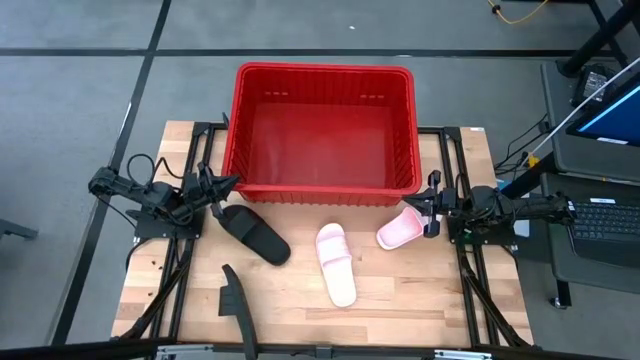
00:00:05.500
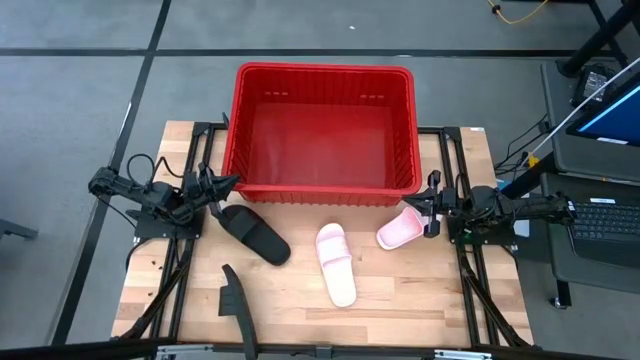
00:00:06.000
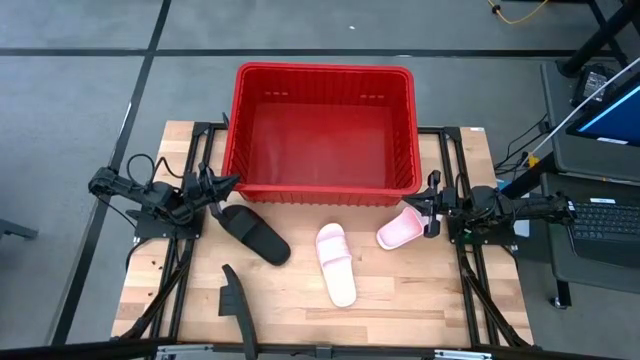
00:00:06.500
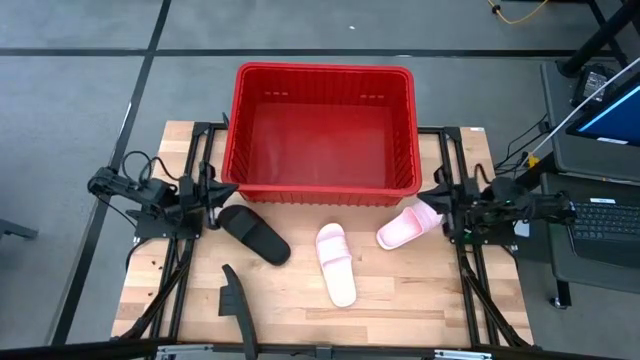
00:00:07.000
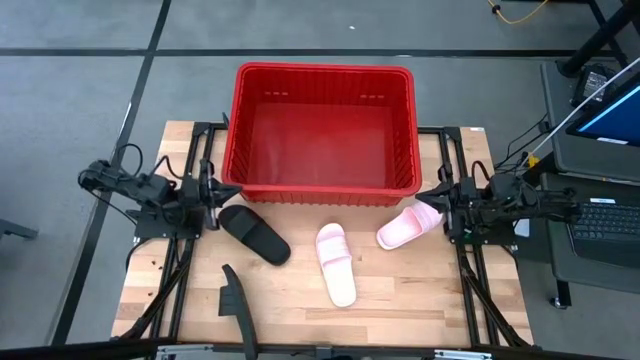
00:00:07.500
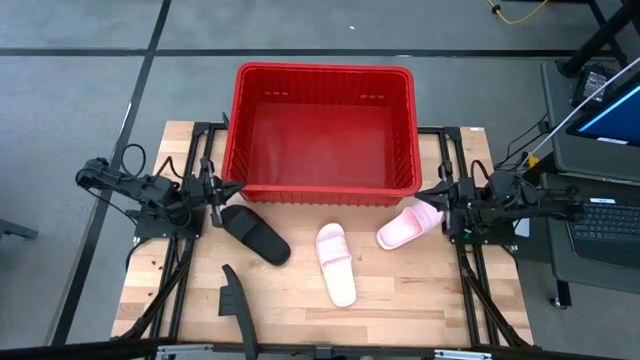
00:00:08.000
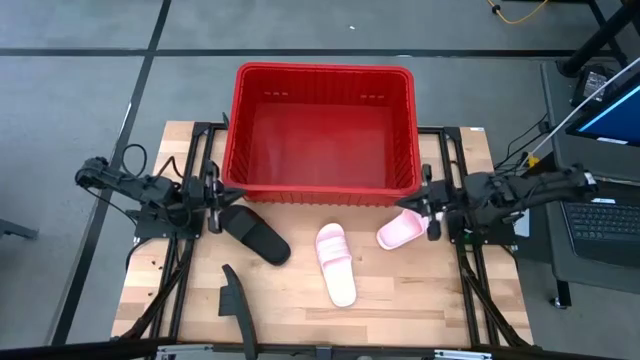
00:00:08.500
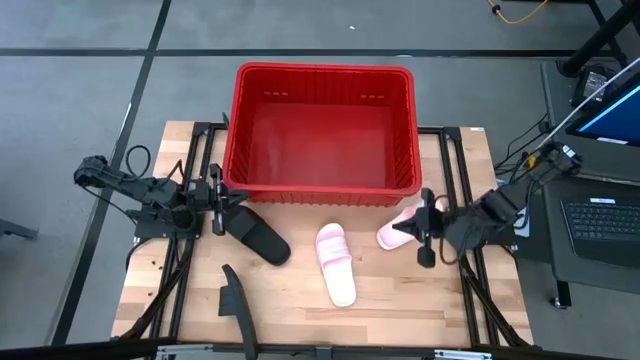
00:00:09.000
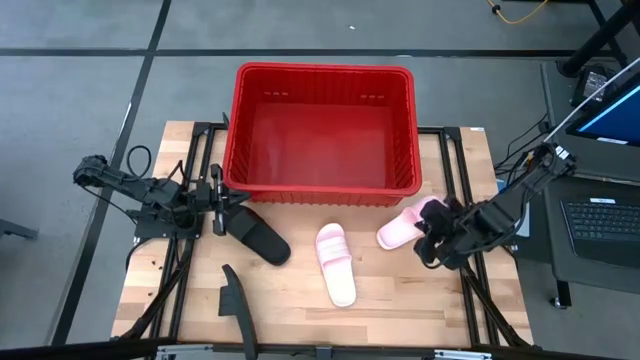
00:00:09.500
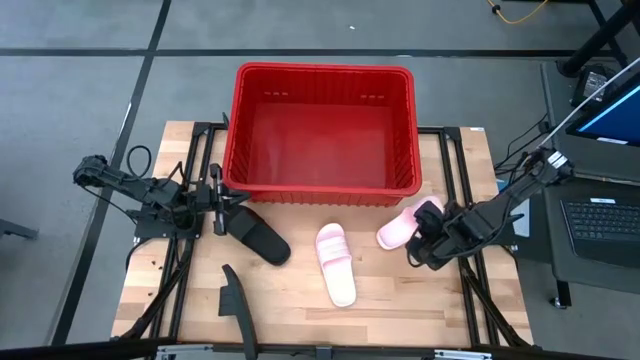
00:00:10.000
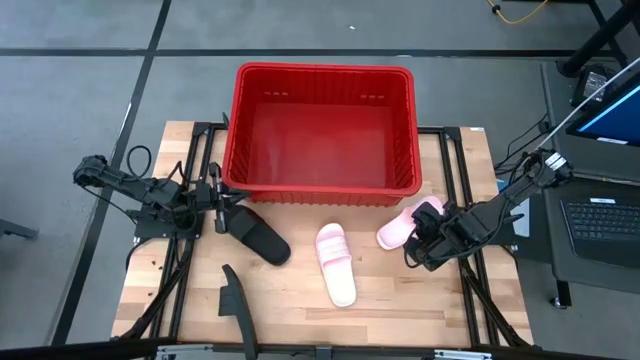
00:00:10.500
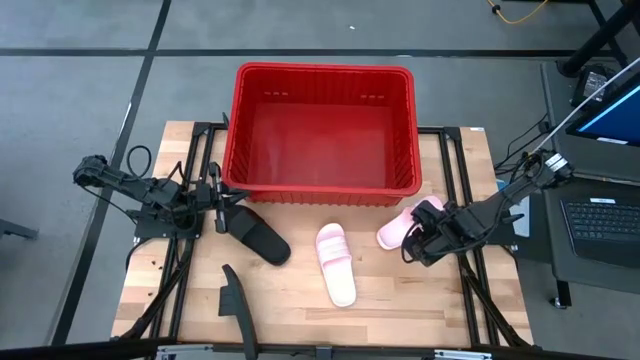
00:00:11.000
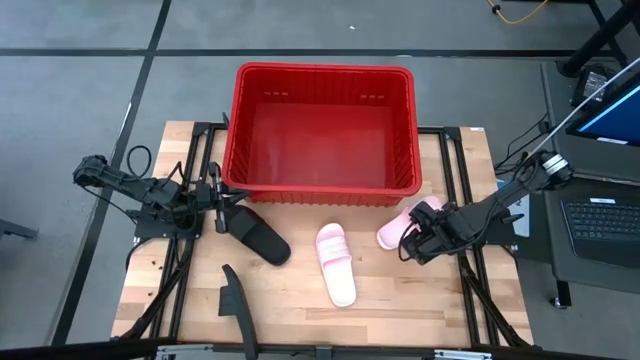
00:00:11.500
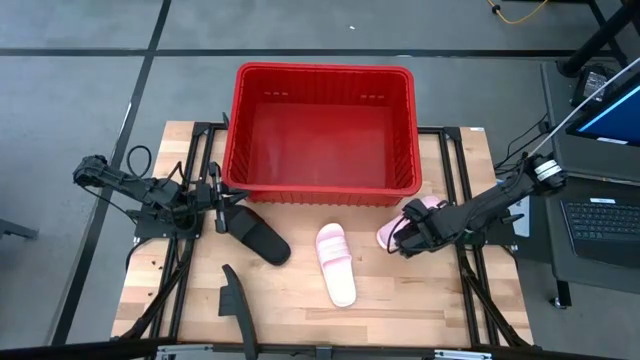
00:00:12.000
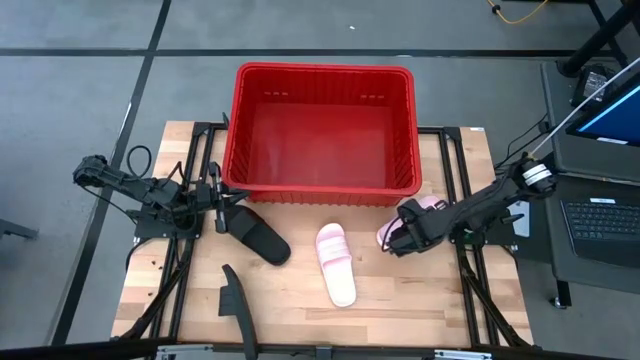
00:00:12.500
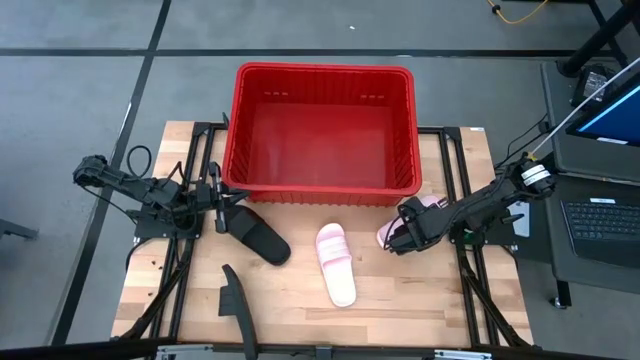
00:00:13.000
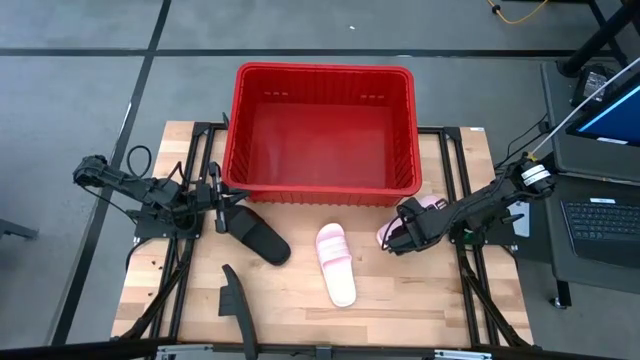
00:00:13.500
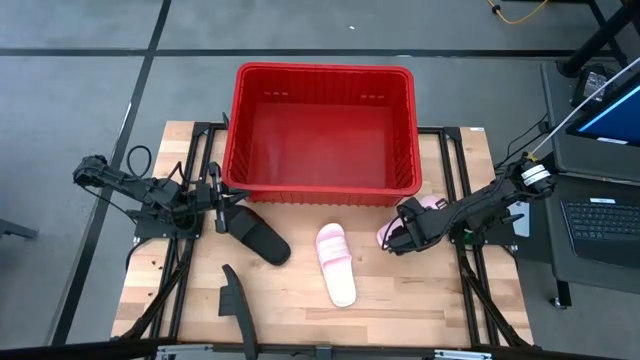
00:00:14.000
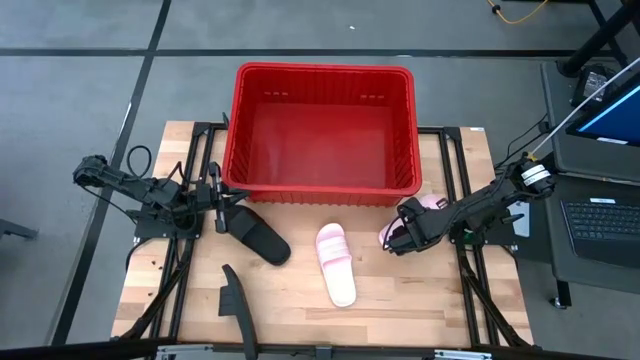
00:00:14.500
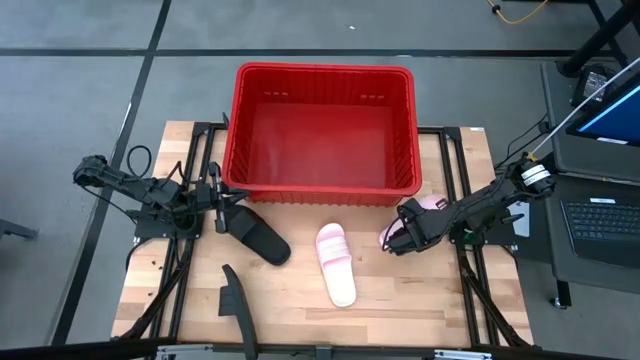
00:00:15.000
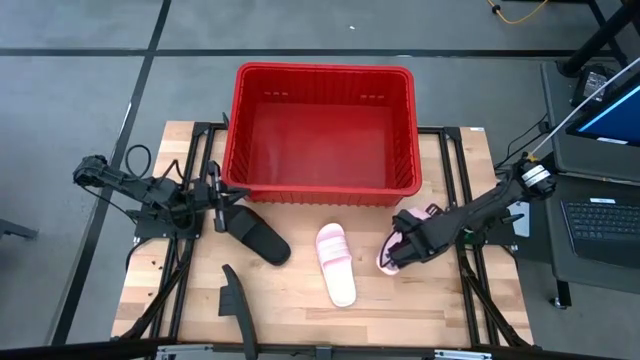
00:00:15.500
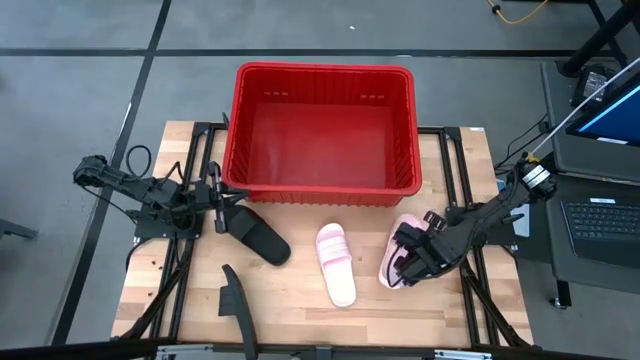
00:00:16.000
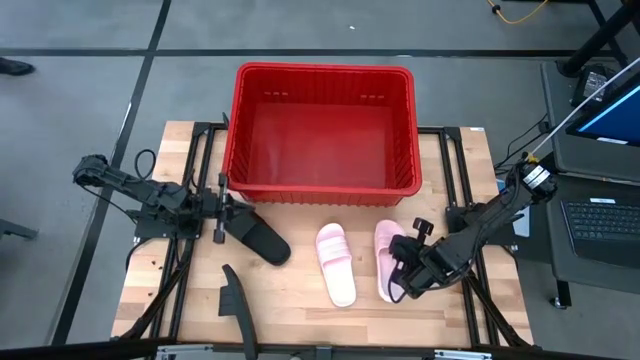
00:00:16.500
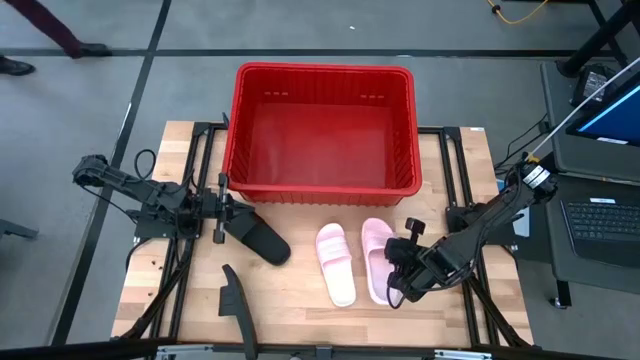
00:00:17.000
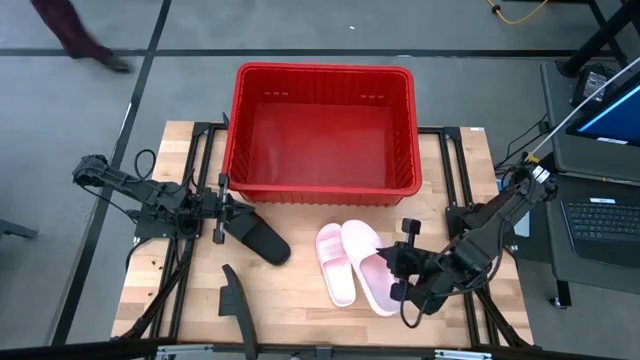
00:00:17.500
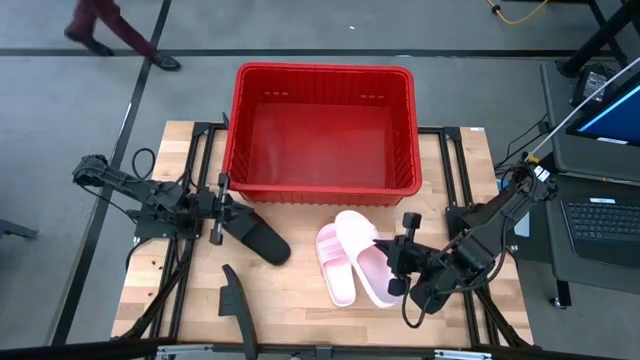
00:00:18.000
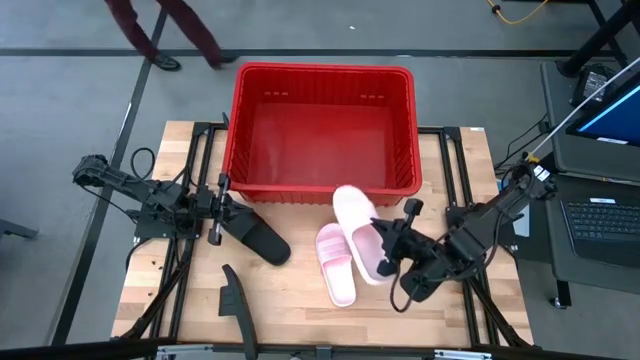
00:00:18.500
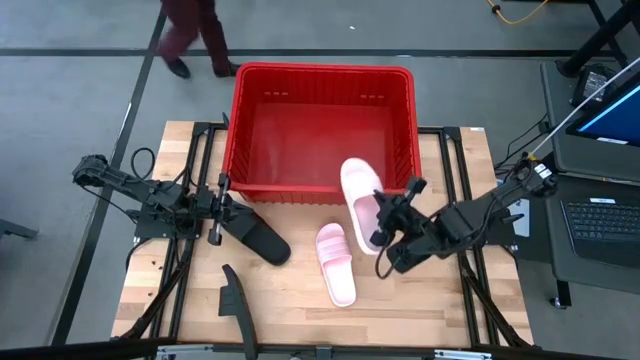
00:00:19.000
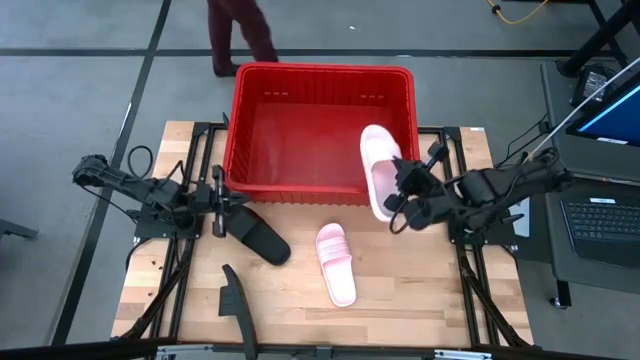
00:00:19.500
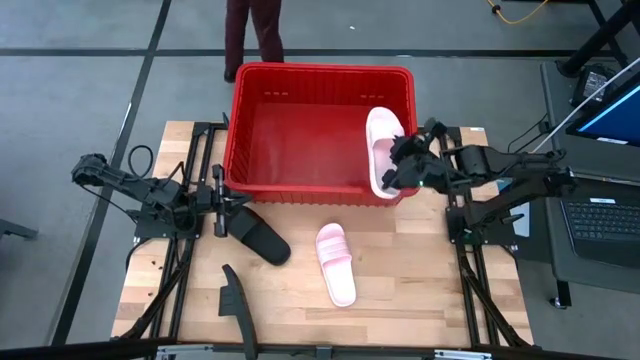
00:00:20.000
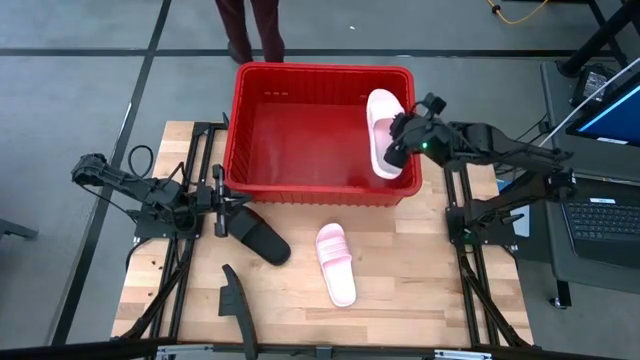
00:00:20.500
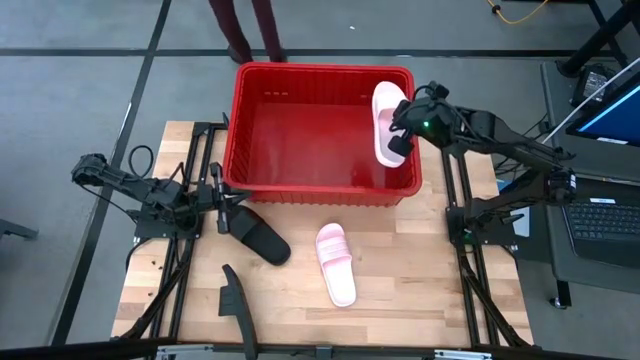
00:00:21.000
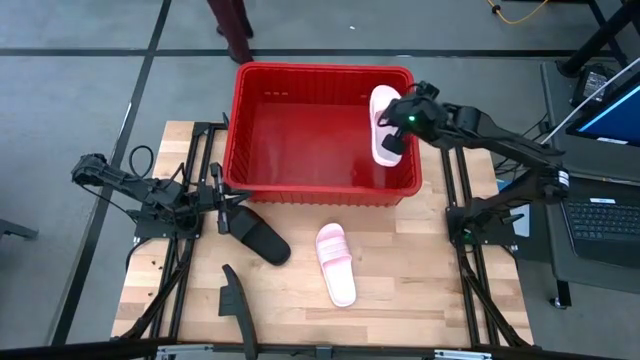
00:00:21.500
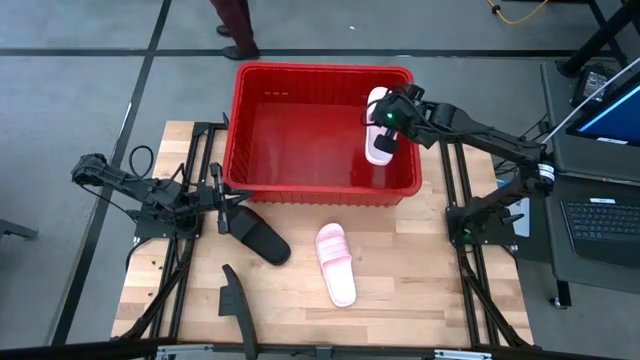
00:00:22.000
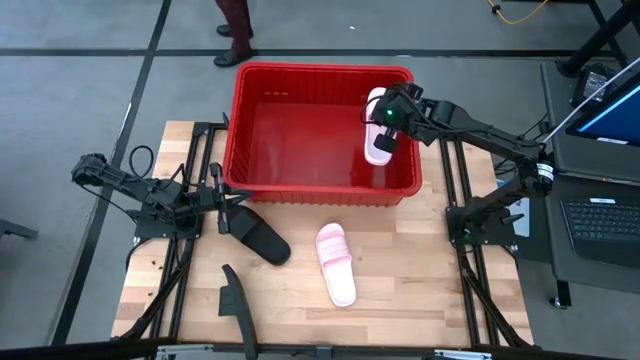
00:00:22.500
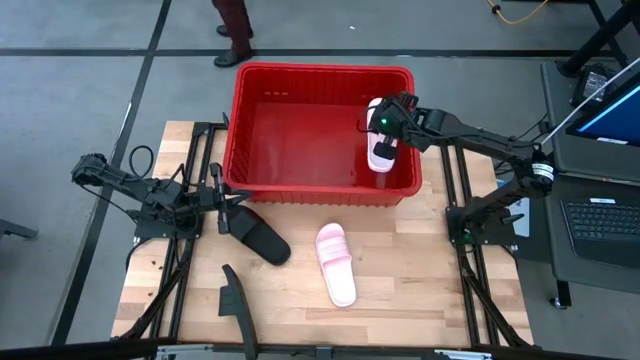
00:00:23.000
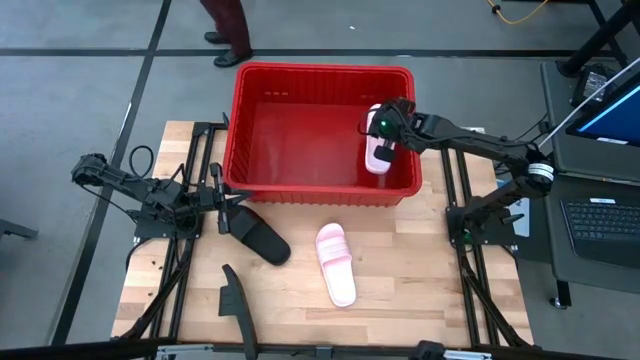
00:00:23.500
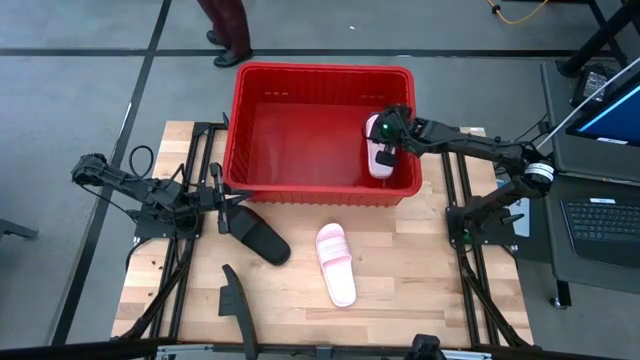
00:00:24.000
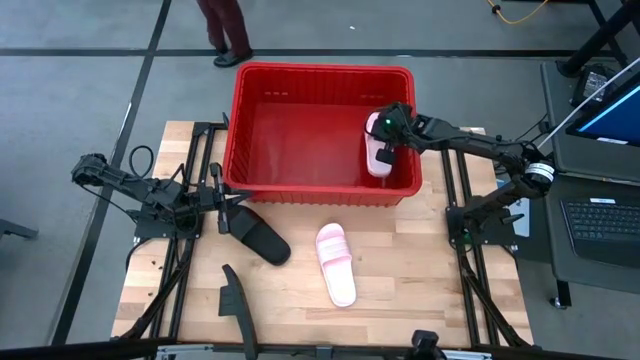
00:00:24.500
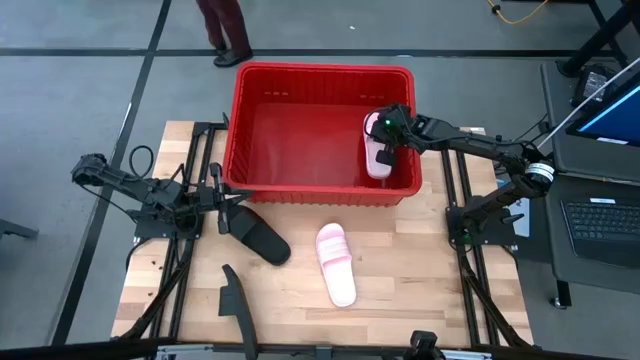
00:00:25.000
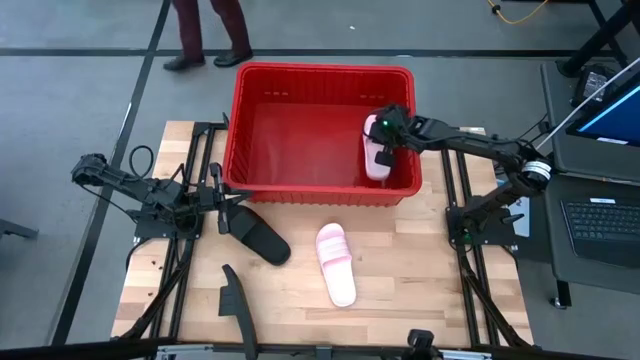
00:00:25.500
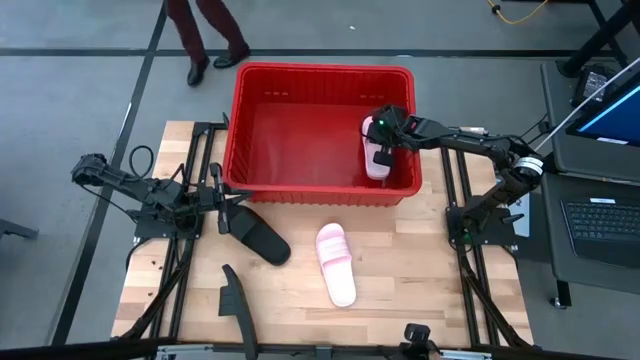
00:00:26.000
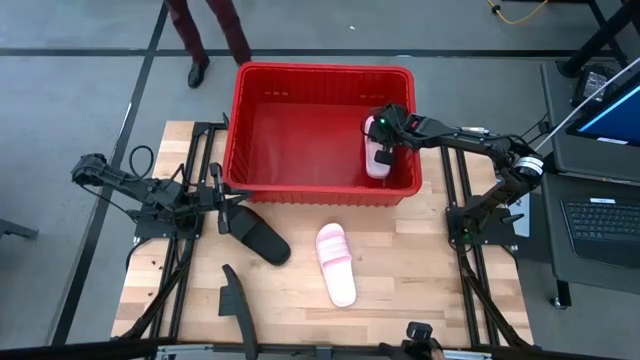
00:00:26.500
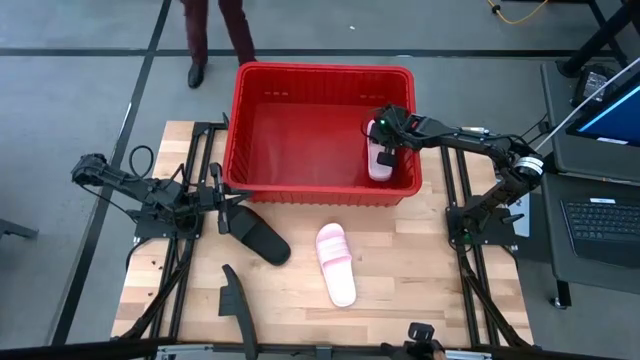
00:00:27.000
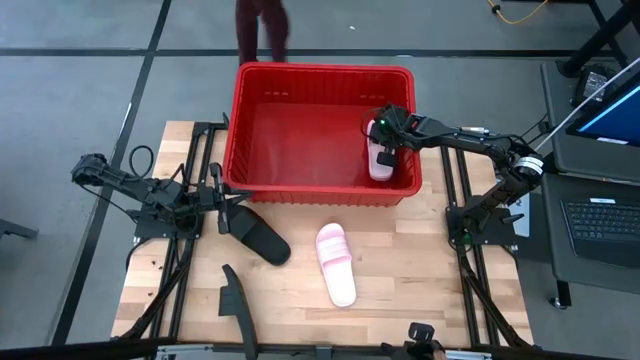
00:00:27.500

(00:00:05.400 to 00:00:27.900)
Task: Pick and place slides into bin
Put the right pink slide into the red container
